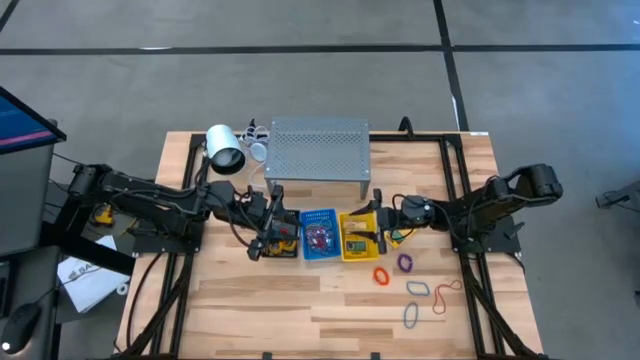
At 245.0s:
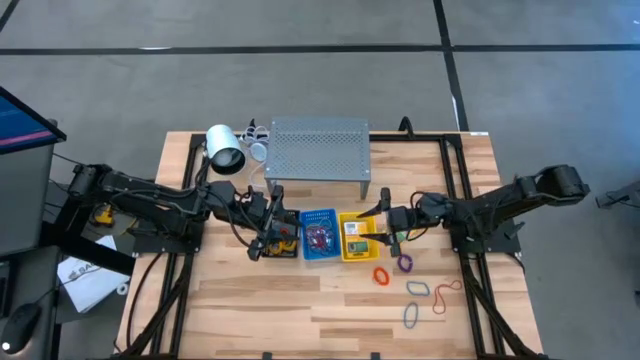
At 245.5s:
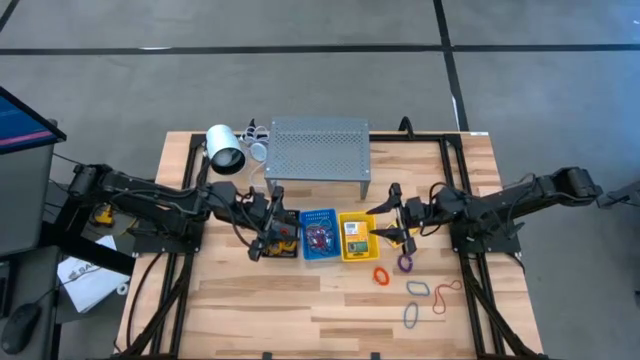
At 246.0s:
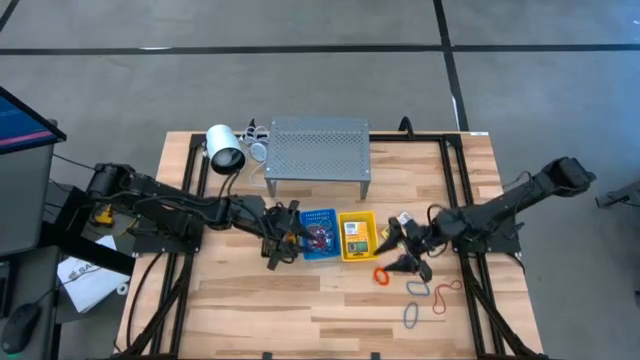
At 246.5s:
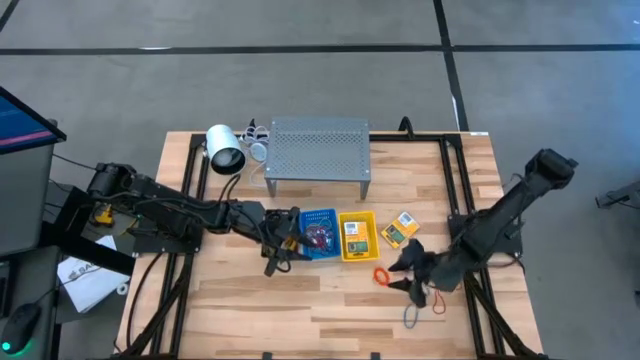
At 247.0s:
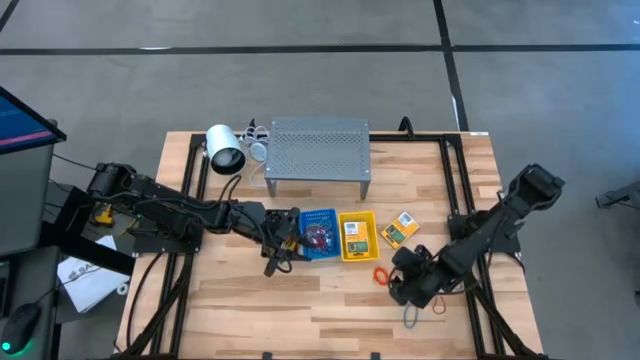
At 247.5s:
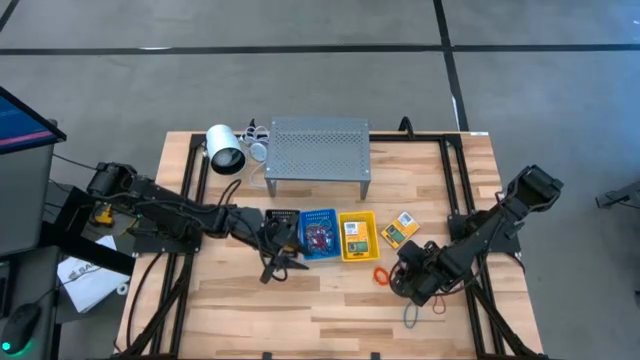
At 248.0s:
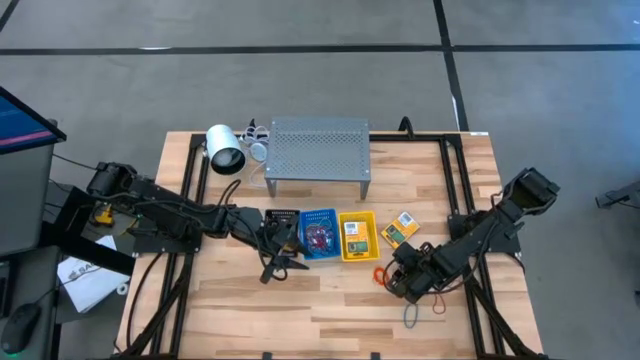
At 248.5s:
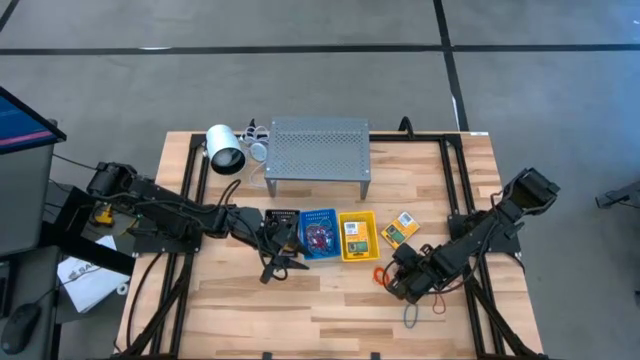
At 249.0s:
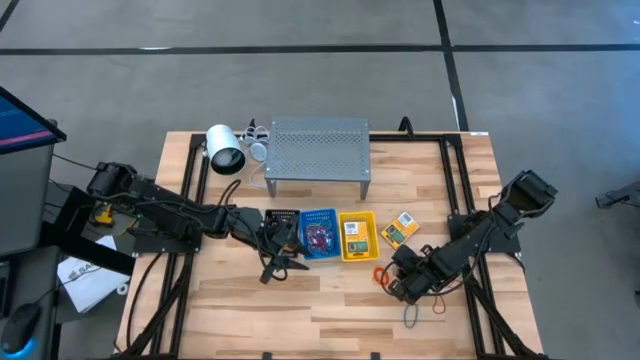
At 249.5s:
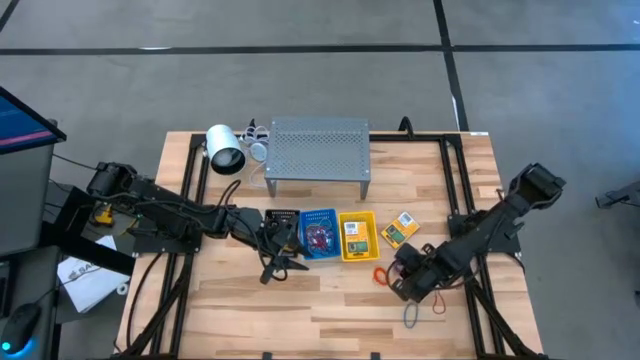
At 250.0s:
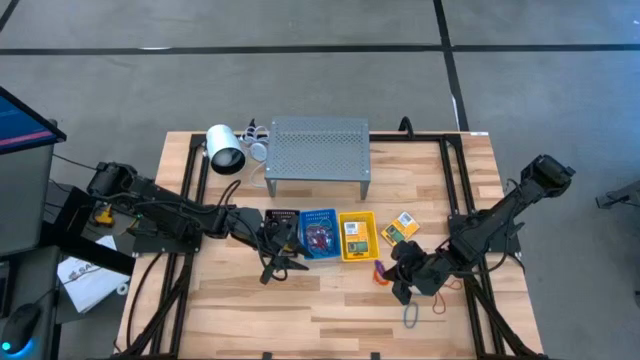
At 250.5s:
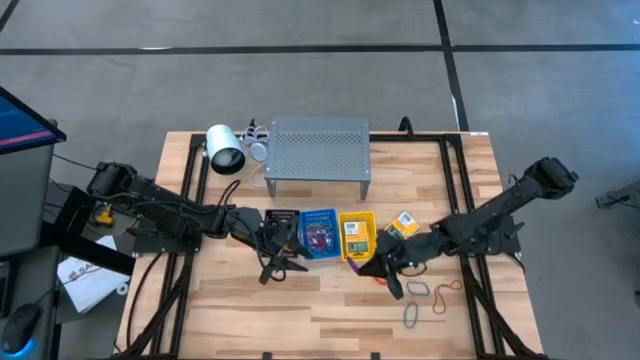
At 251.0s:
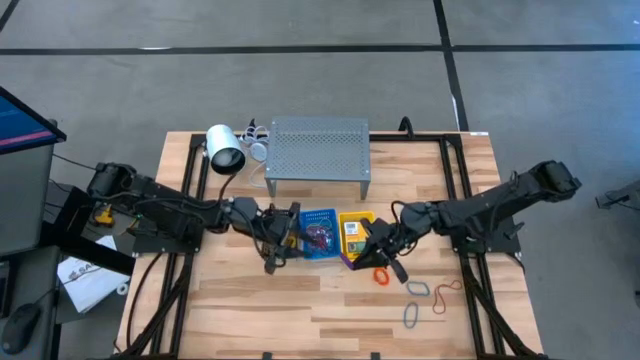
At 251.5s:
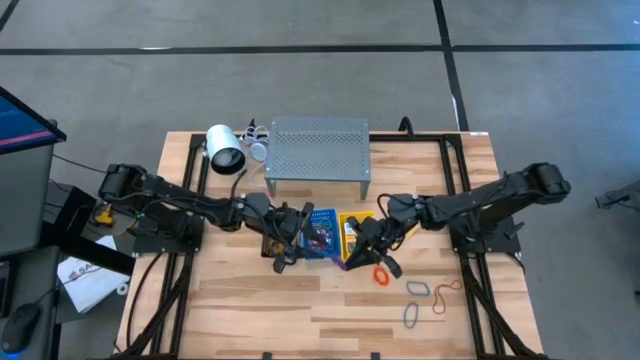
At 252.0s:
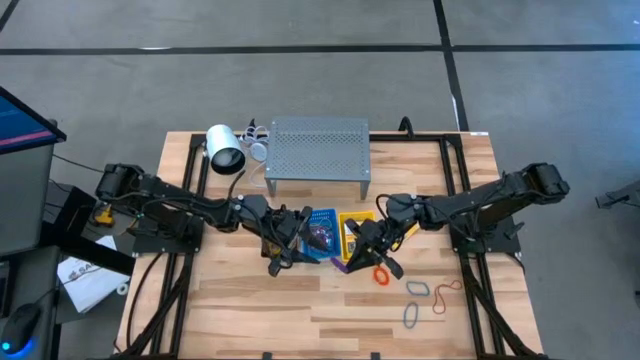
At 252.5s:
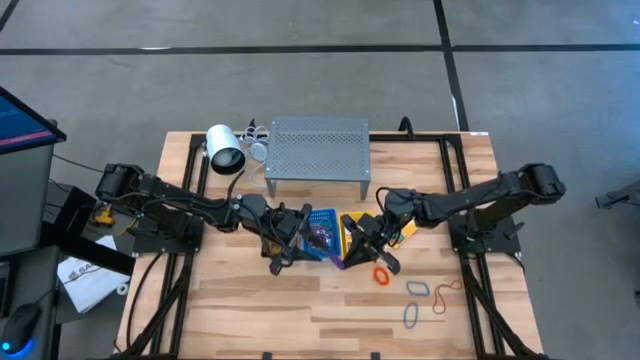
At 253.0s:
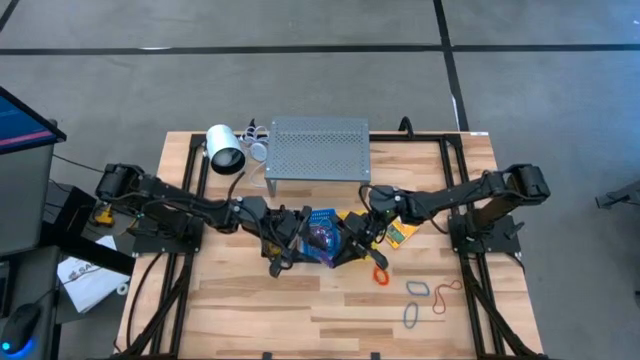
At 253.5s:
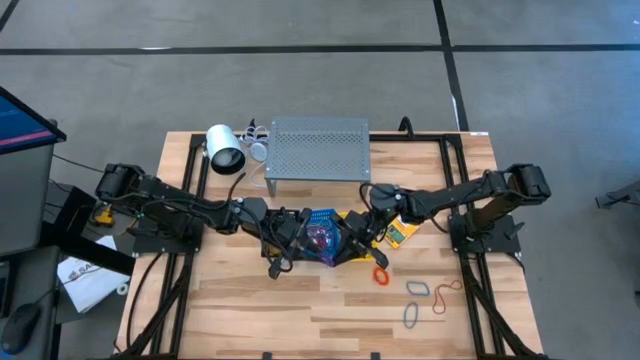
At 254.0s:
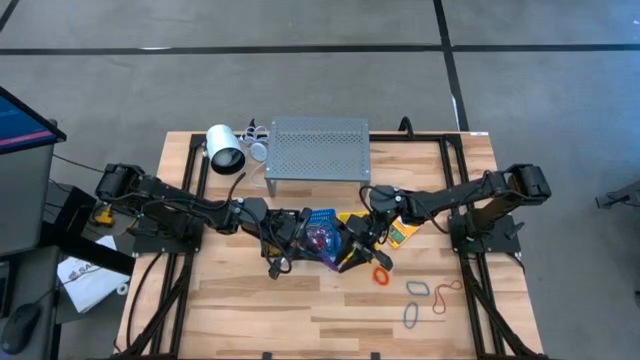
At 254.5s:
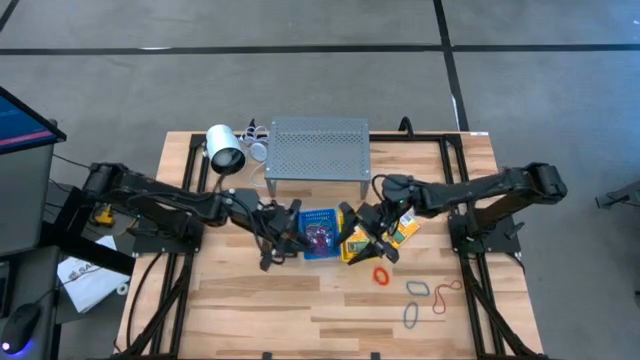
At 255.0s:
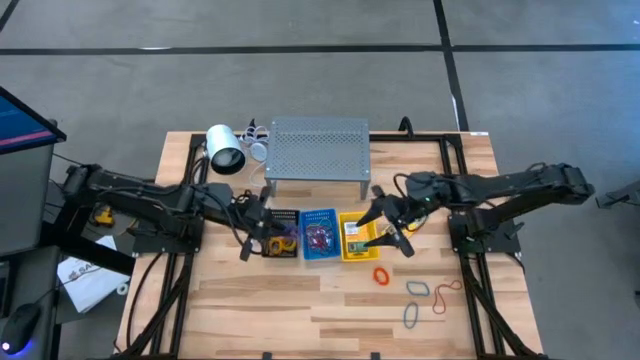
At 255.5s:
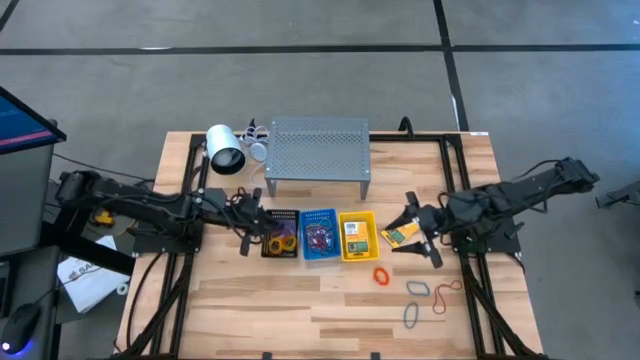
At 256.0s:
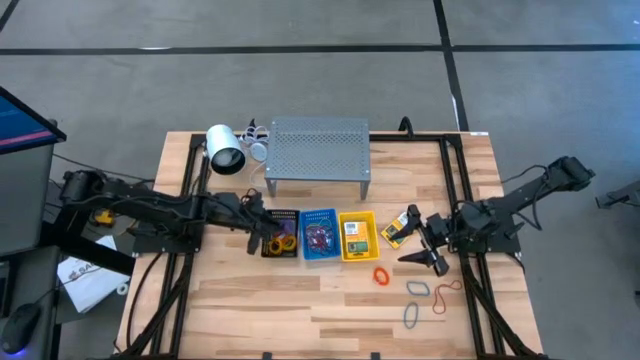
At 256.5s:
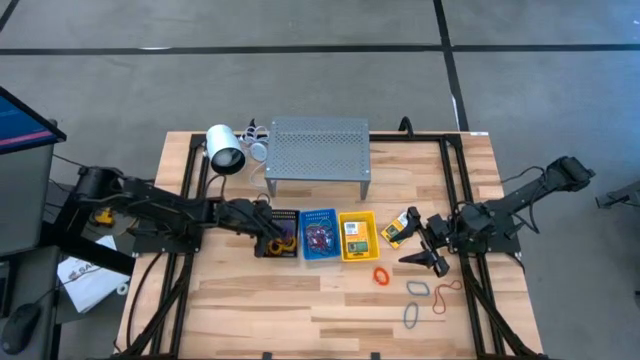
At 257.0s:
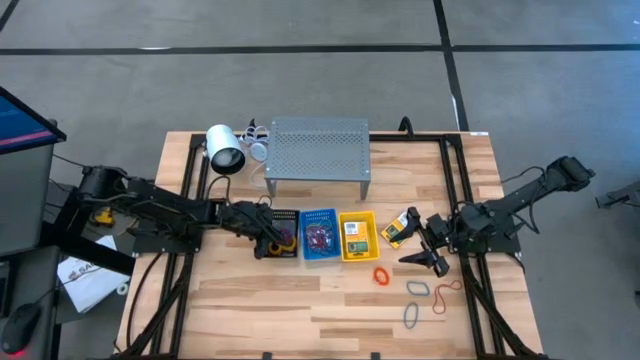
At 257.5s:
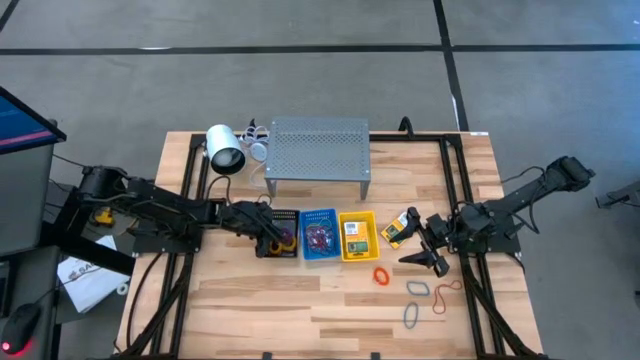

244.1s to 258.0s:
Task: Pick & Place Office Desk Supplies
Put the violet spring keychain into the black basket

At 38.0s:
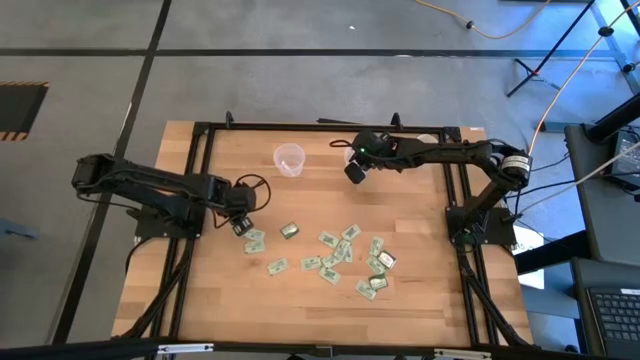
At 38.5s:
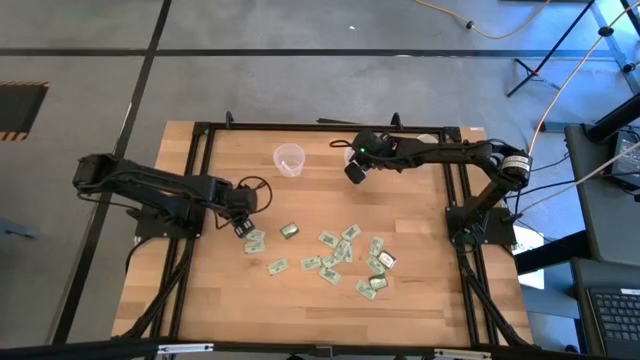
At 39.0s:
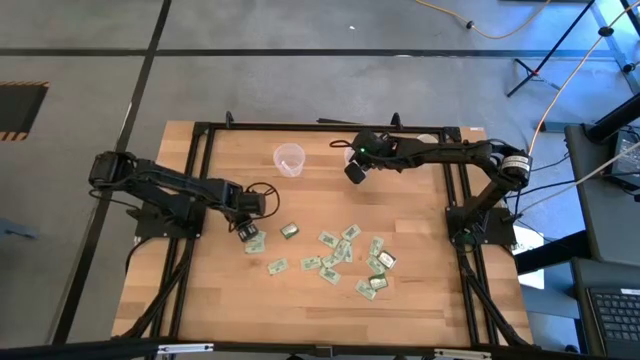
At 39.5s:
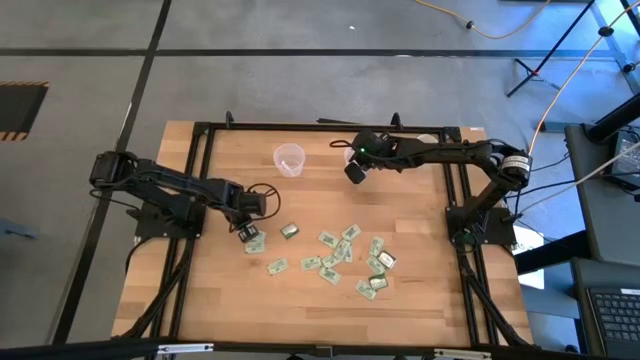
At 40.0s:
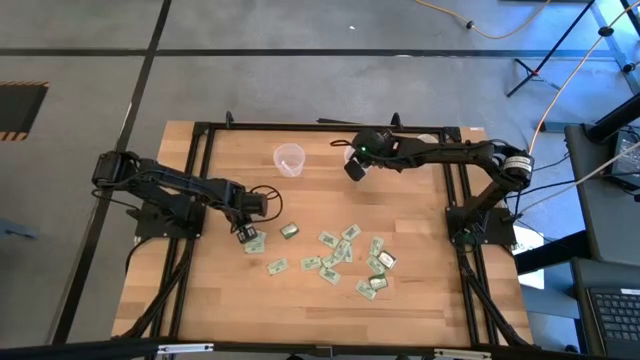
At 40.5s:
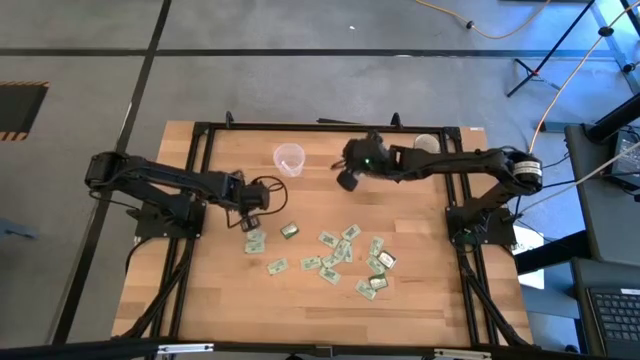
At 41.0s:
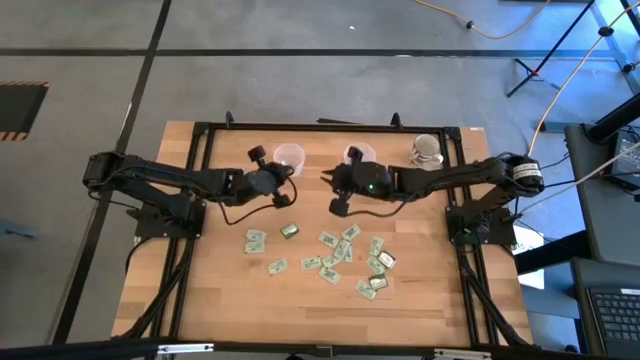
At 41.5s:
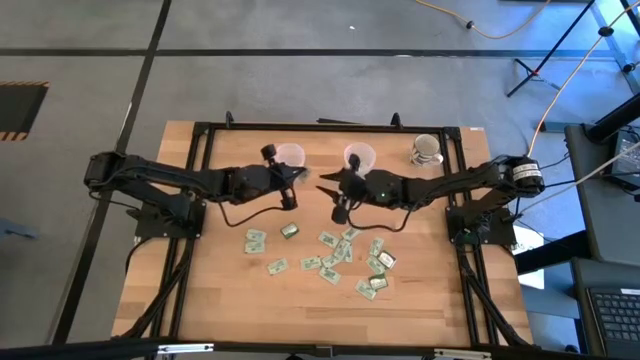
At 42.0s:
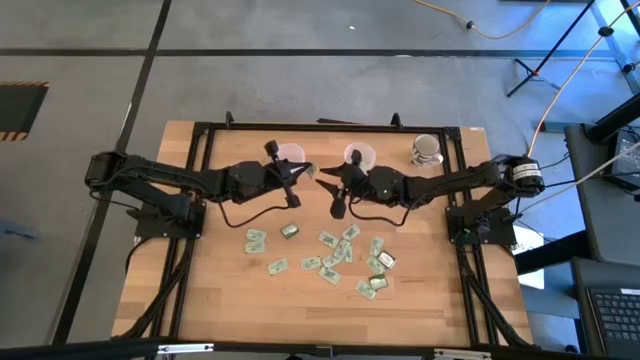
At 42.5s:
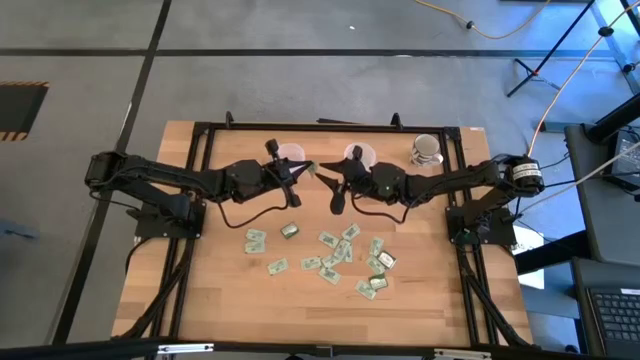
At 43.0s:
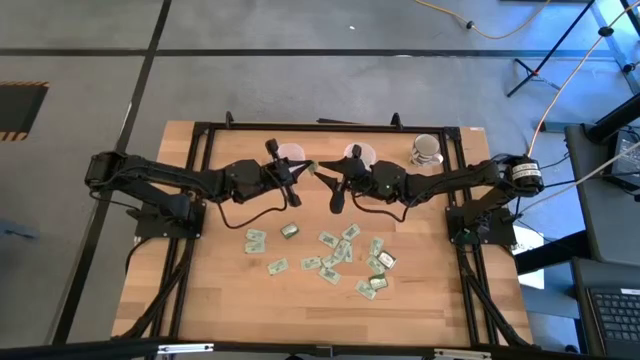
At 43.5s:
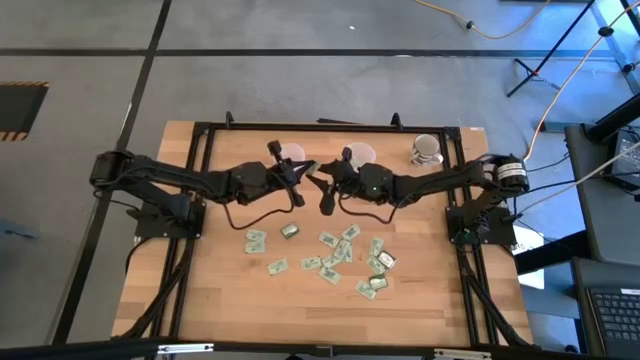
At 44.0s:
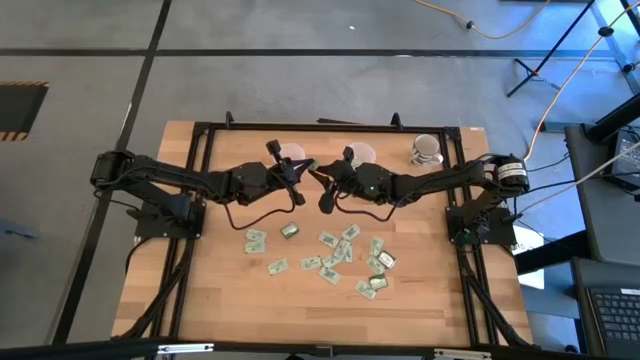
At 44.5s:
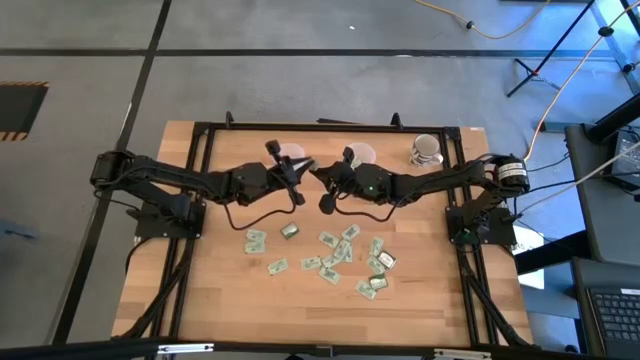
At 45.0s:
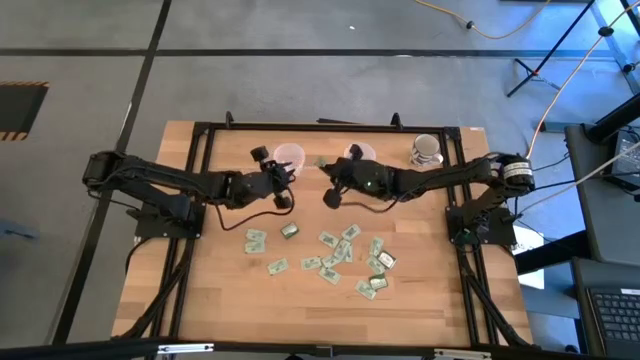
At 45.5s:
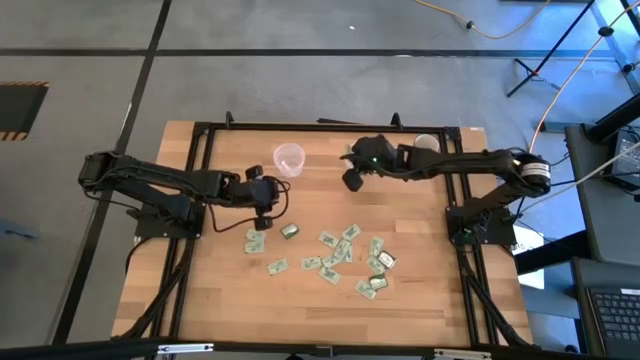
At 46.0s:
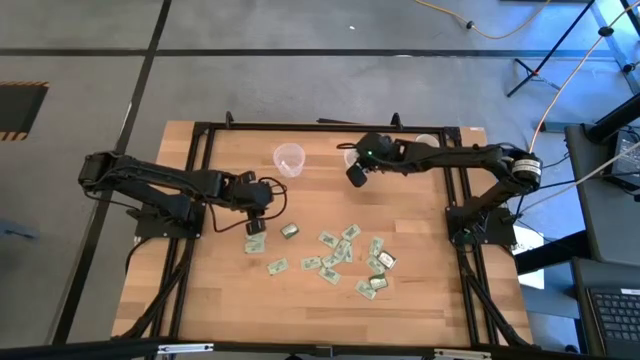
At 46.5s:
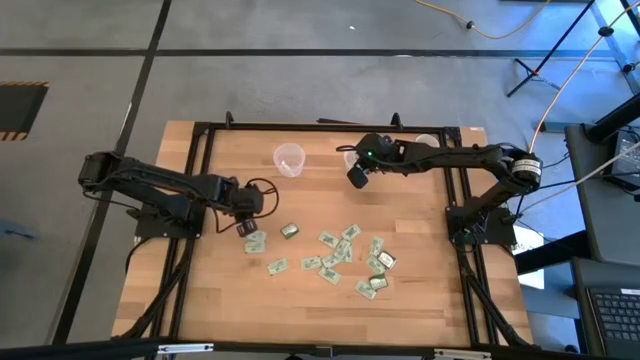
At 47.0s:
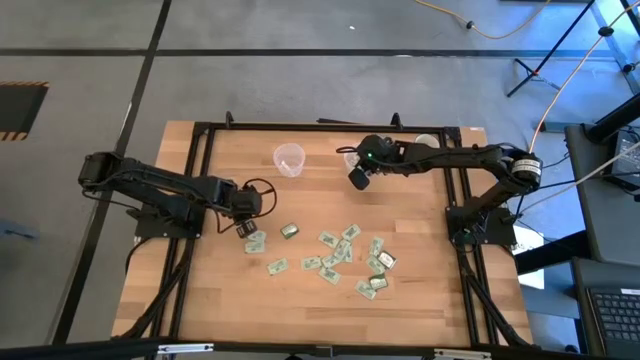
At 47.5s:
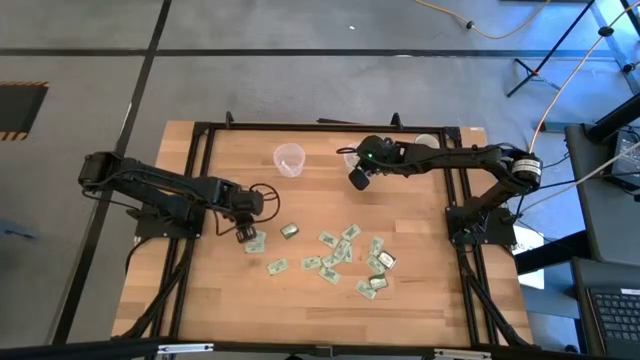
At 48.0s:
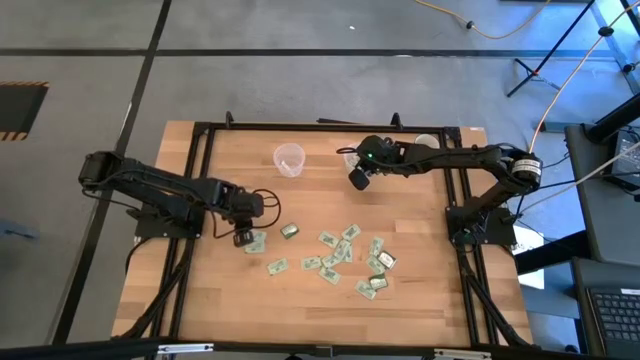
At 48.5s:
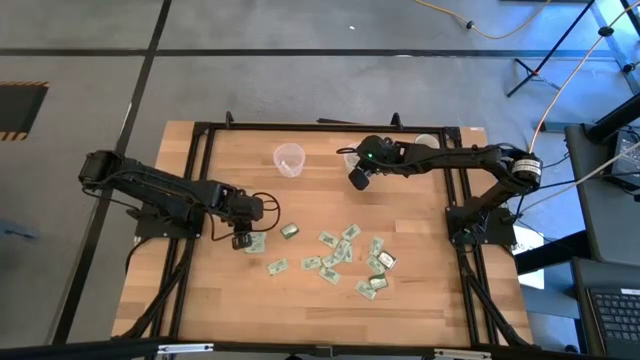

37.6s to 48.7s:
Task: Pick and place Stevia / Truvia into bins
Put the stevia packet into the right transparent container
